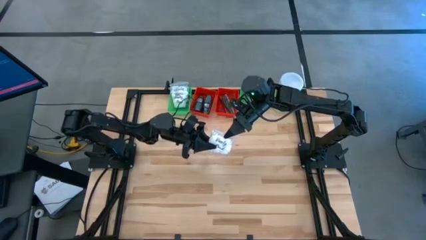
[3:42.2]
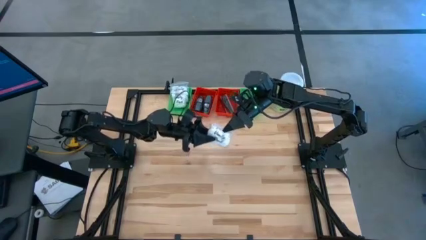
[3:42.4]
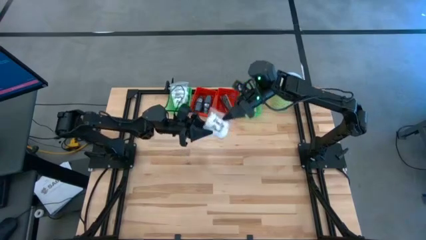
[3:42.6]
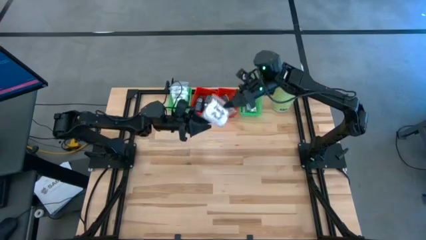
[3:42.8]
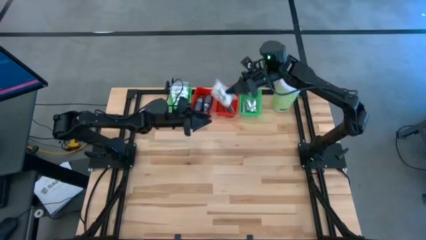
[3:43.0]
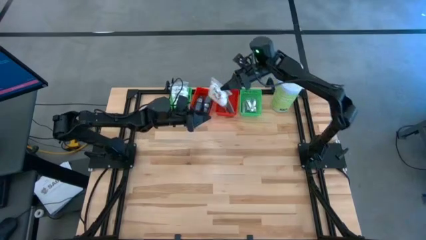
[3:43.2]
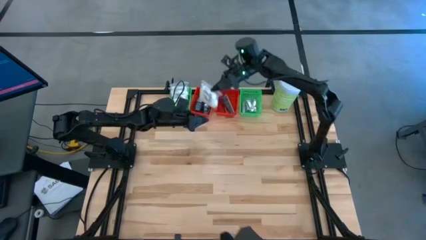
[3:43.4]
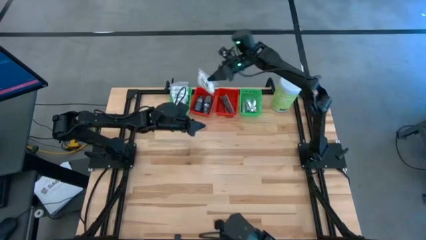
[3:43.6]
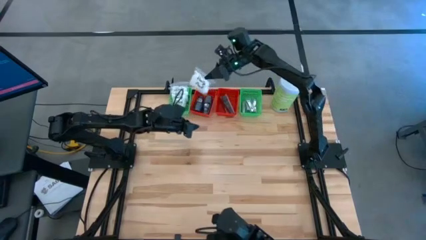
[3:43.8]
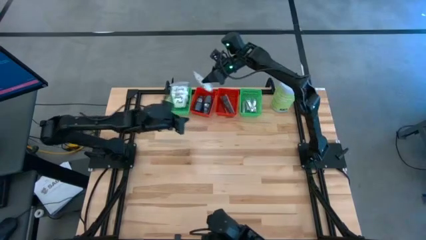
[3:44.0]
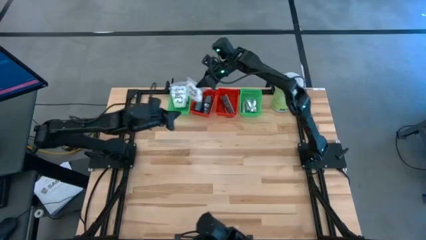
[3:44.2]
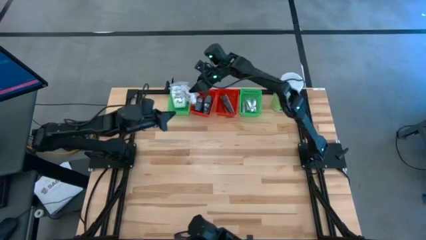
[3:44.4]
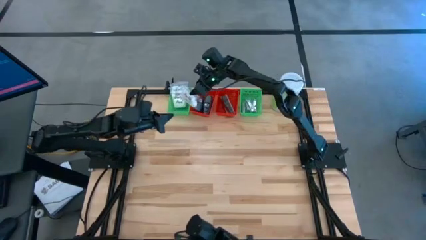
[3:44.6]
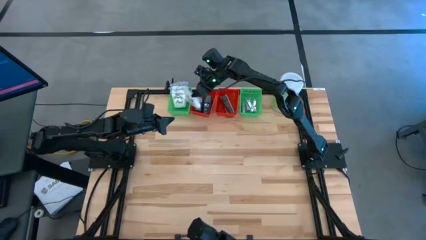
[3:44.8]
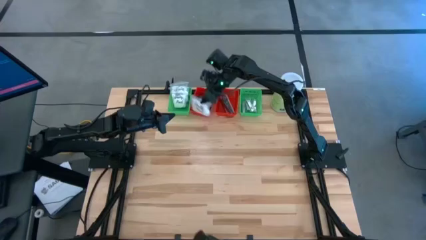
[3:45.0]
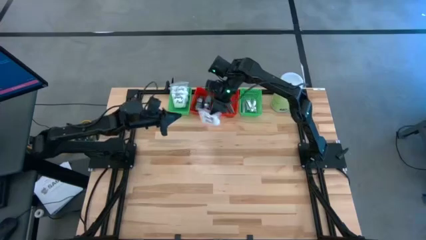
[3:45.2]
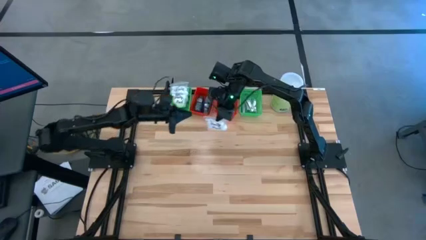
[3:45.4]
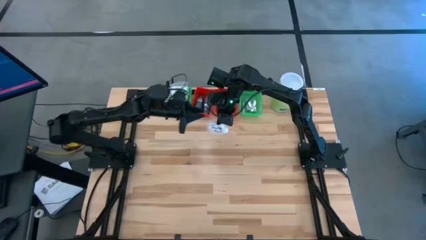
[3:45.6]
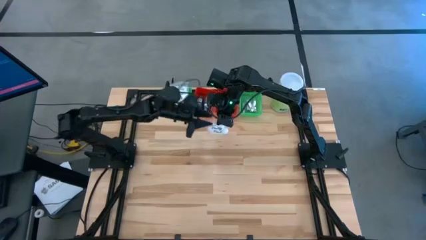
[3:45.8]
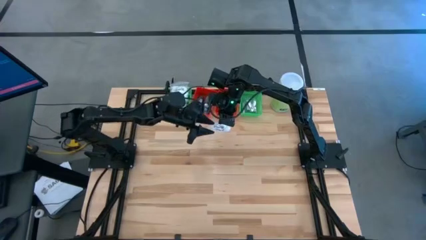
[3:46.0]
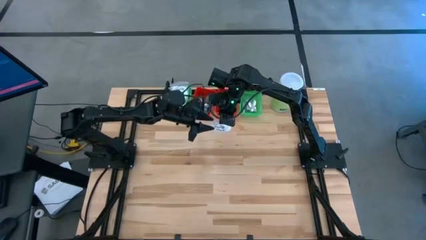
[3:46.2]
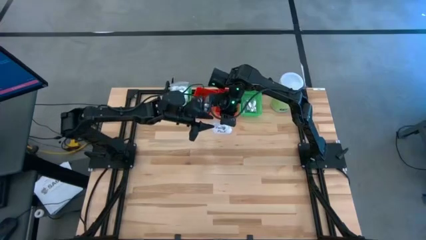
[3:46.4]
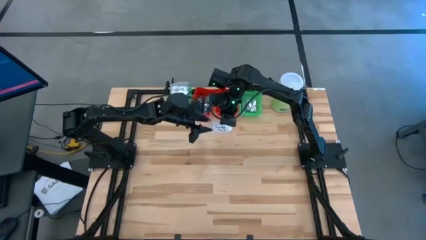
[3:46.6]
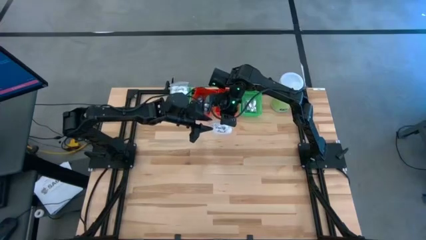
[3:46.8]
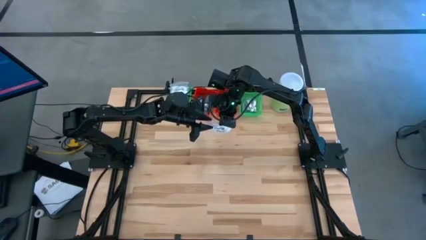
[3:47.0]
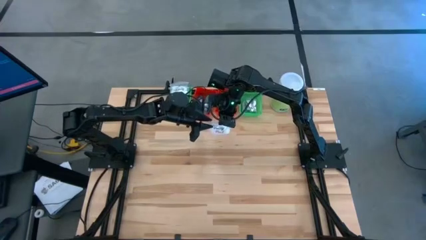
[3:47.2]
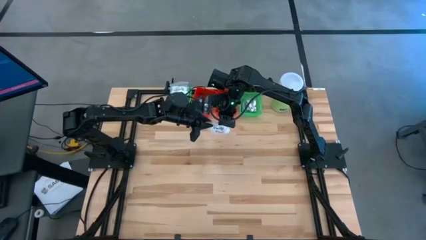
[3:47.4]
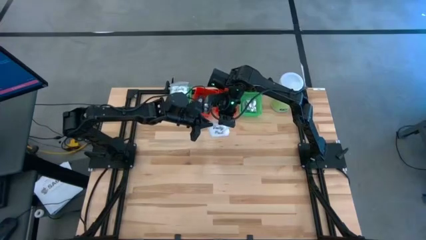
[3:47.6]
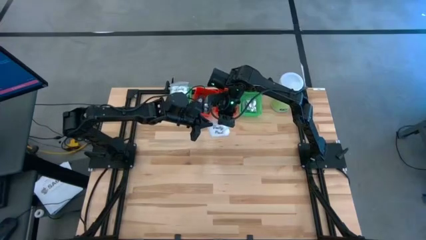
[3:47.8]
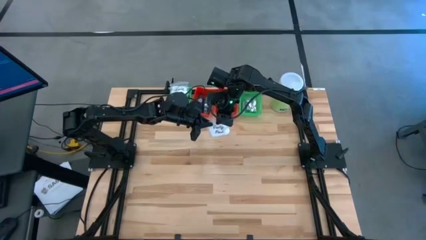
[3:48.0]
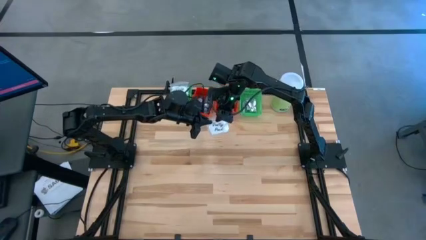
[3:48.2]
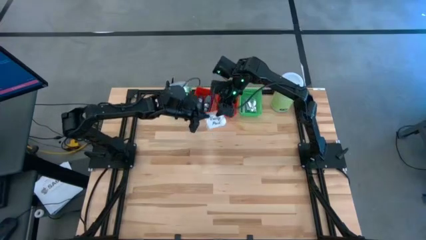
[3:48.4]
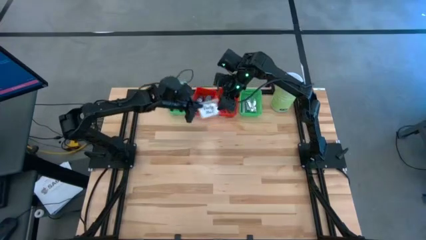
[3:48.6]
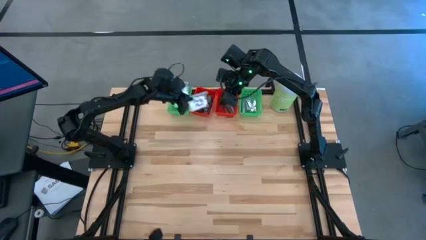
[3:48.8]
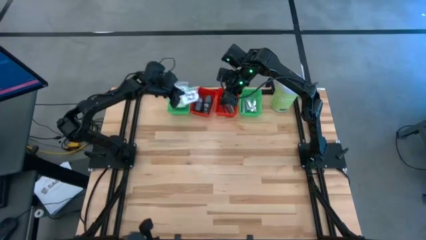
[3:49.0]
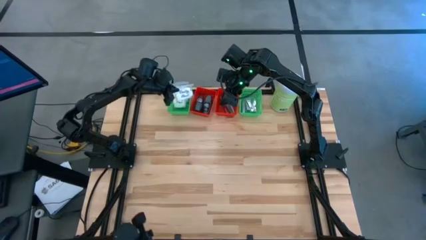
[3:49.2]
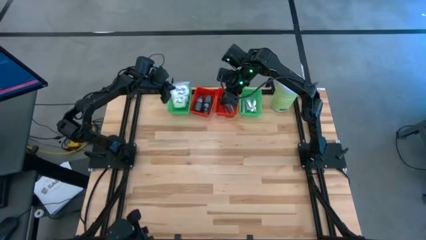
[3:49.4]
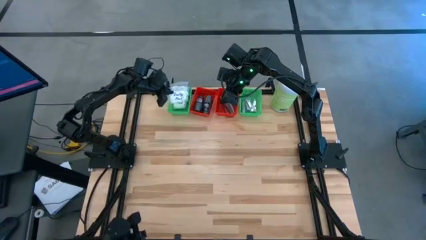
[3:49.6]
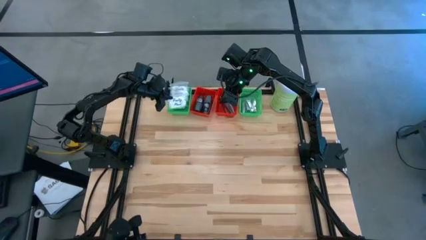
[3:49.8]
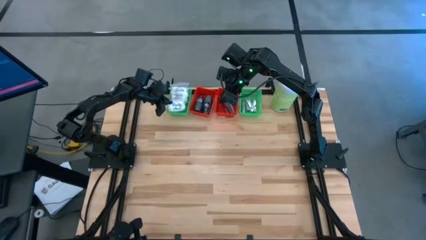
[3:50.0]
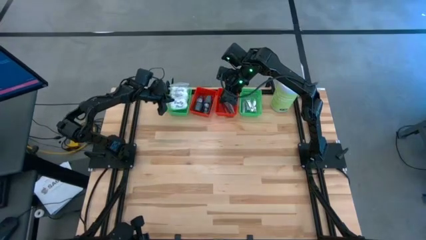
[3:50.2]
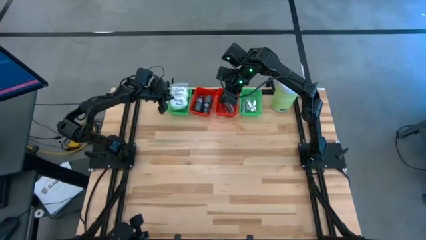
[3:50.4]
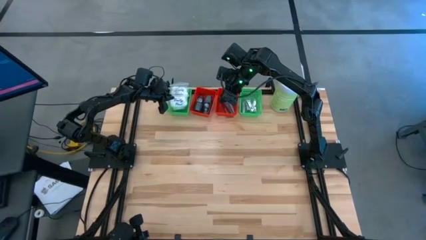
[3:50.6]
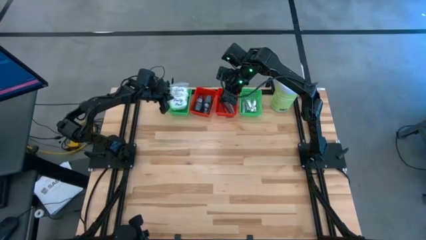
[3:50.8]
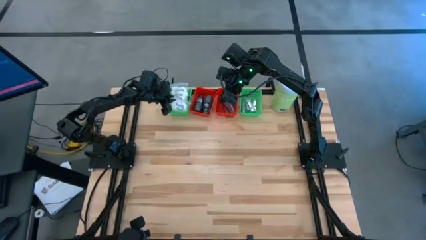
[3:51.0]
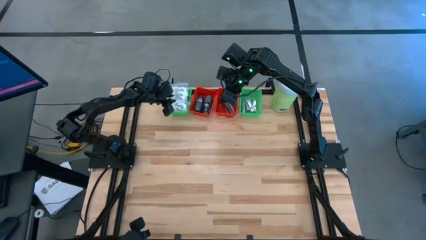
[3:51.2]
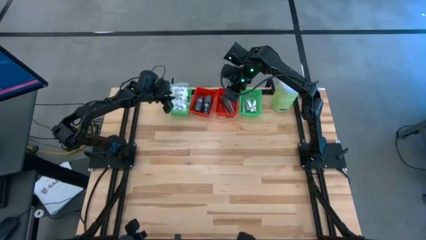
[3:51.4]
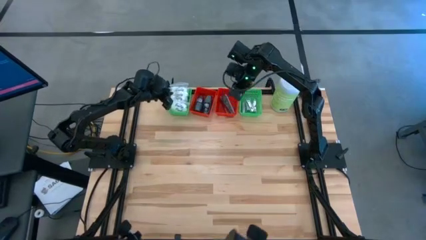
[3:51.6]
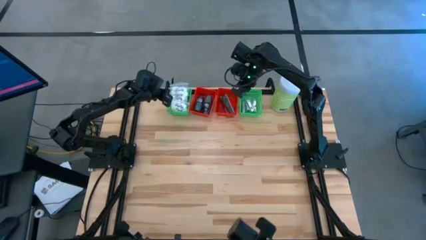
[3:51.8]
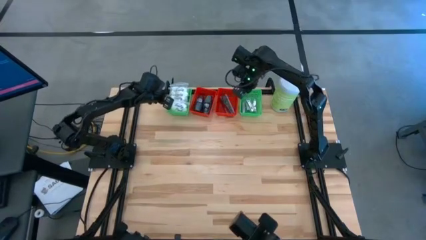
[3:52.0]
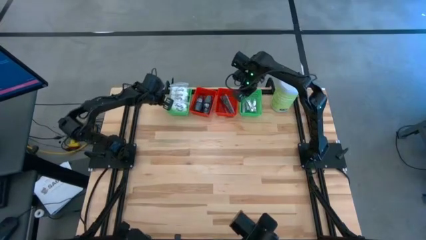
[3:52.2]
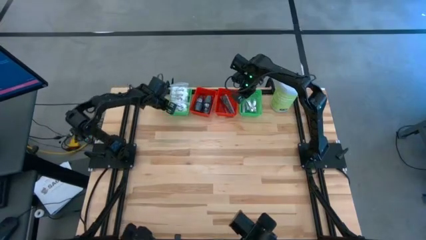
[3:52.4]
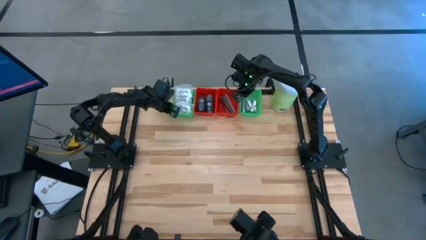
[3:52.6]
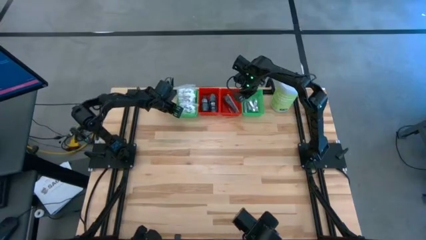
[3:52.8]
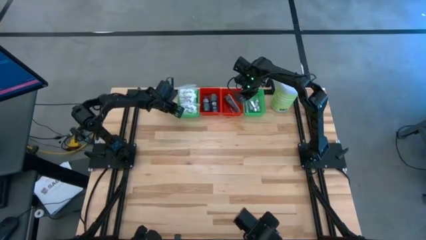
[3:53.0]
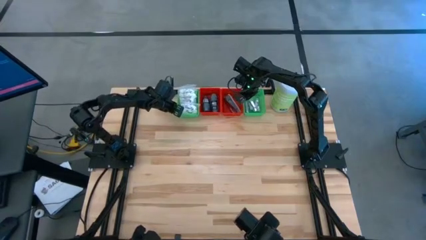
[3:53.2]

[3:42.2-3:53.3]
Task: Pick & Place Travel size toiletries
Put the cotton pack into the left green basket

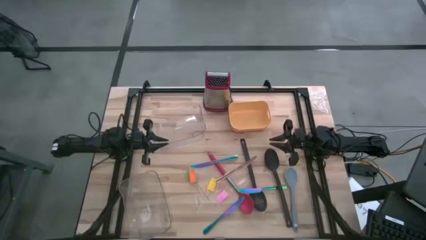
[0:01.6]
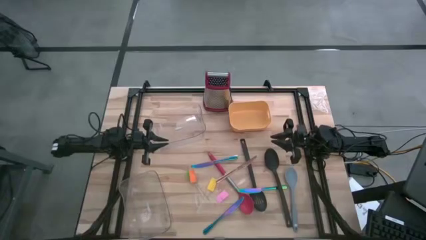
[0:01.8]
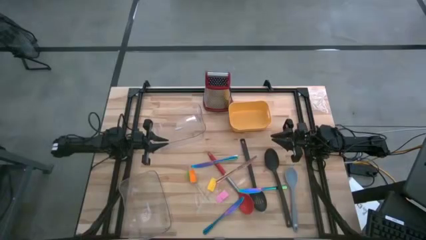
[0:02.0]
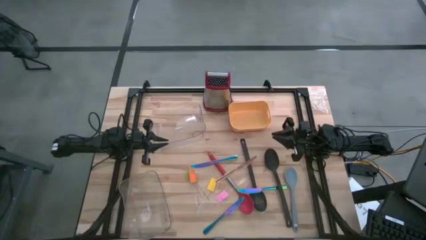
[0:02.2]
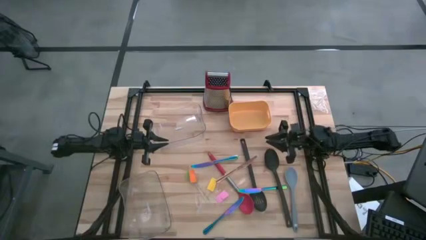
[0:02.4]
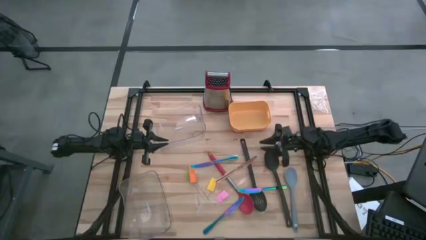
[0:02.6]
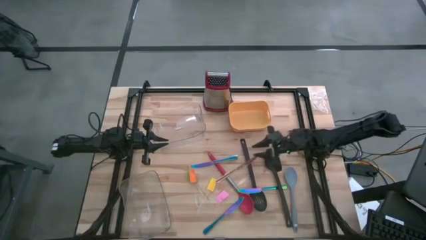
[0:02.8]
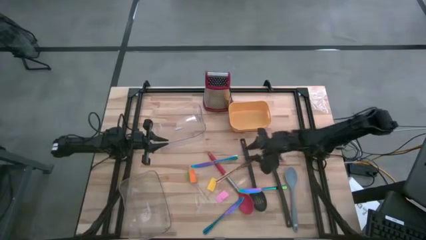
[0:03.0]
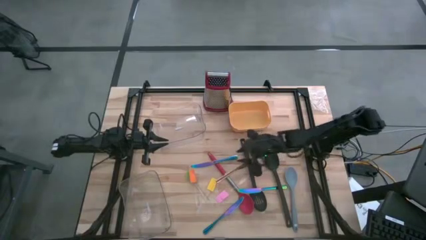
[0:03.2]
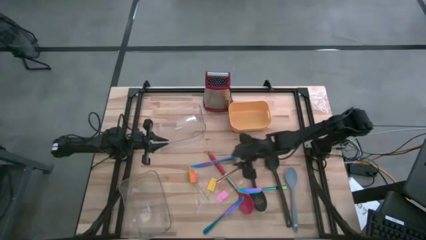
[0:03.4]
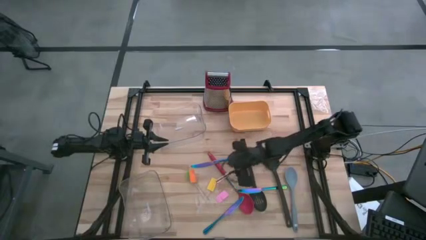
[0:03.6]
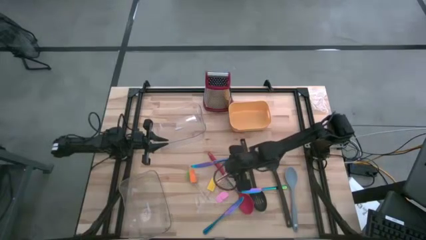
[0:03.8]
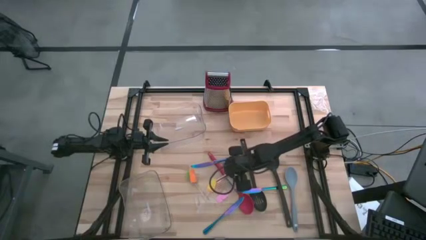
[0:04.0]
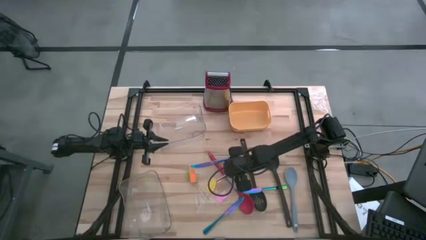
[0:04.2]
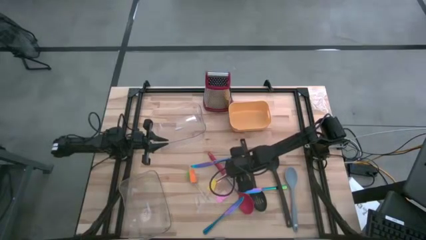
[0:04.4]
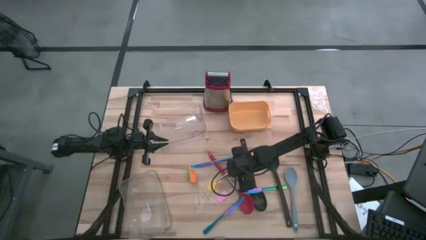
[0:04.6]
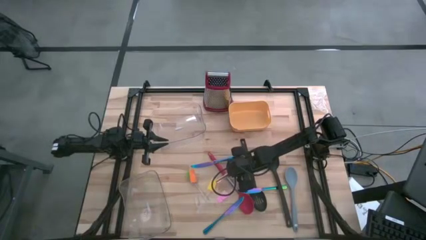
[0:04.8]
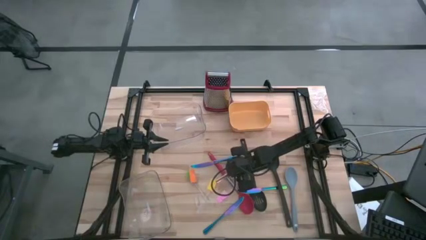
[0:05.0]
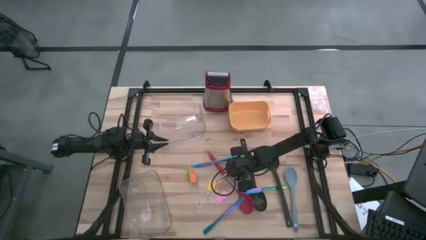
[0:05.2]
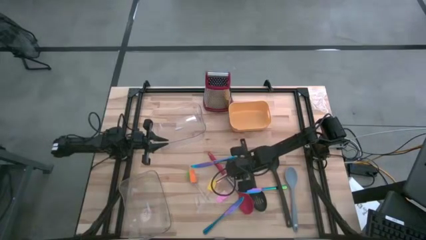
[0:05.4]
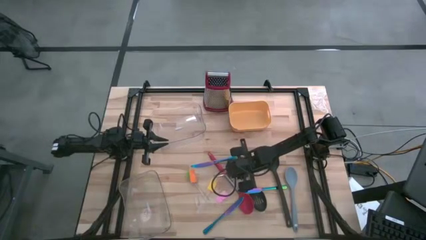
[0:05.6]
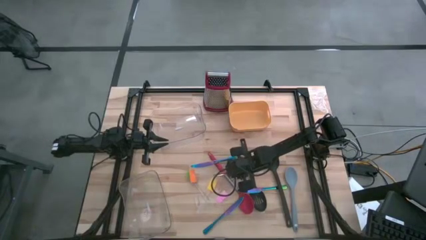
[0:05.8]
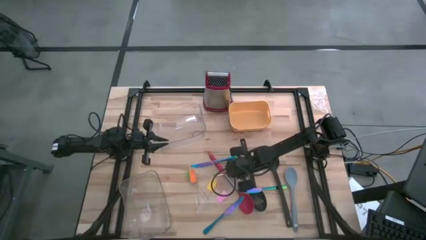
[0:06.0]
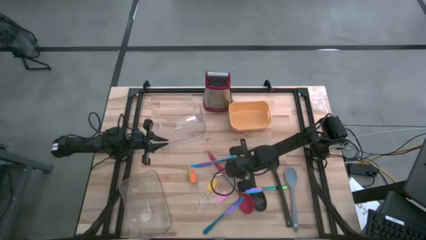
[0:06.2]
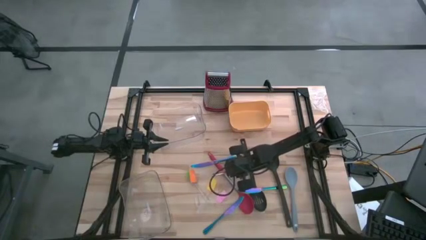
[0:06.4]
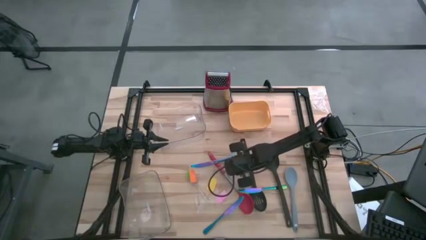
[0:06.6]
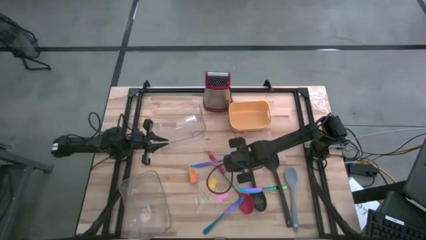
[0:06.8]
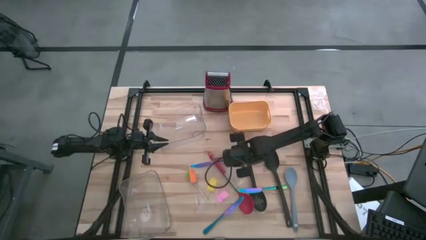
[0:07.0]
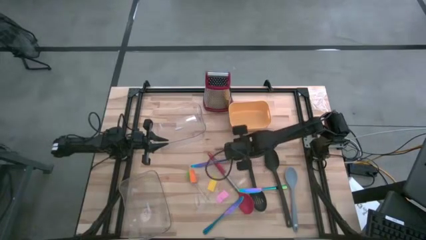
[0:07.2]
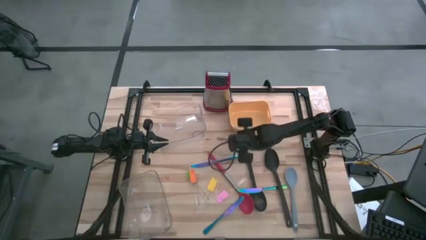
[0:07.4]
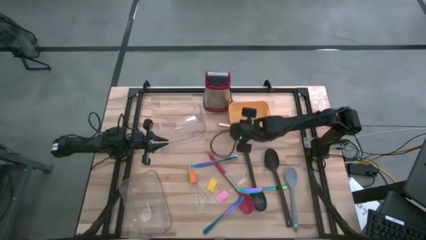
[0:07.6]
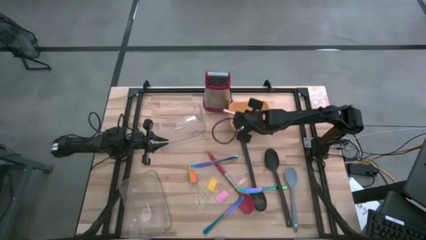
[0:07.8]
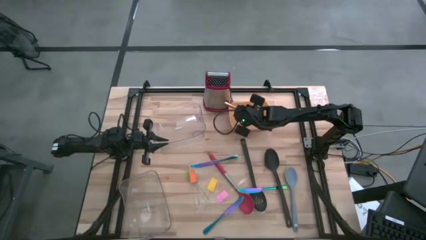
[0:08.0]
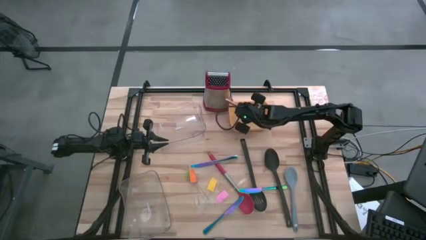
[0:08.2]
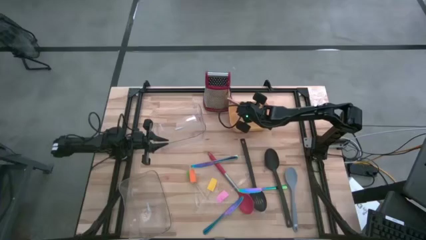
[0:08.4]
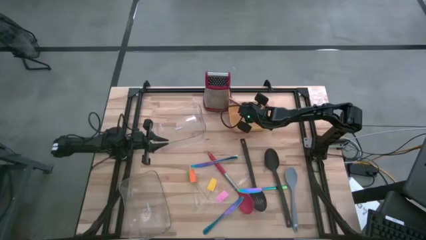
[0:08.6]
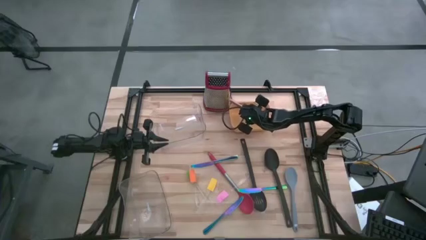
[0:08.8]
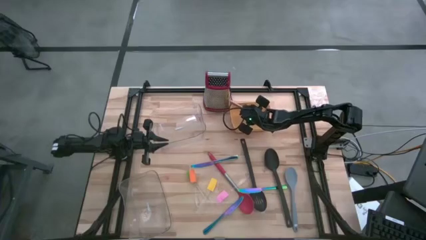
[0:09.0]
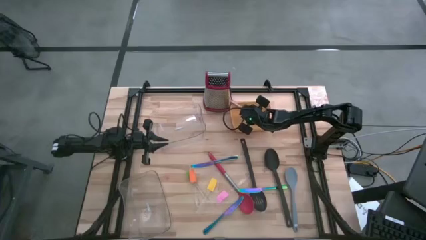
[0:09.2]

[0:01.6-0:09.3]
Task: Pick & Place Kitchen Items
Put the yellow knife into the yellow bin
